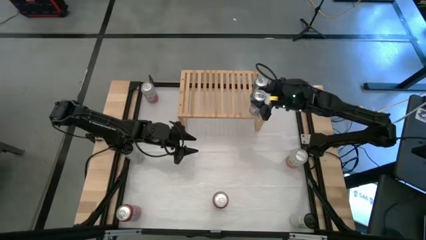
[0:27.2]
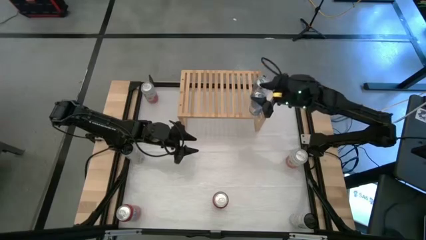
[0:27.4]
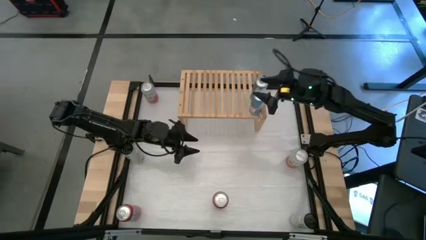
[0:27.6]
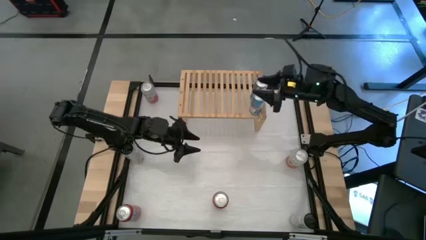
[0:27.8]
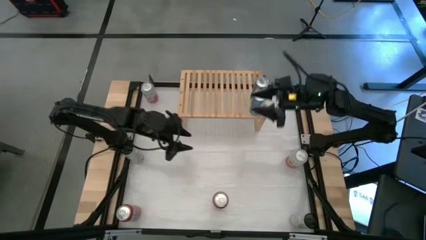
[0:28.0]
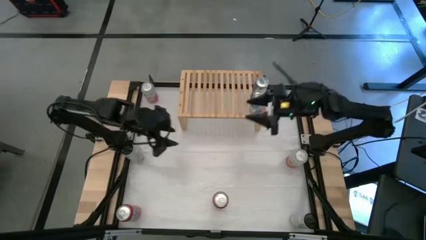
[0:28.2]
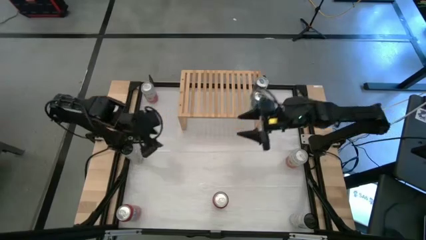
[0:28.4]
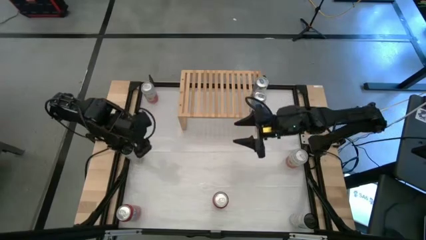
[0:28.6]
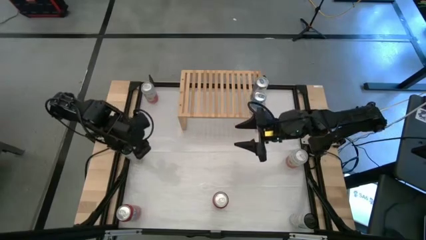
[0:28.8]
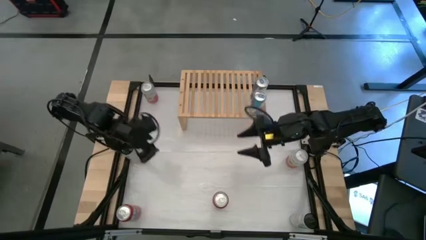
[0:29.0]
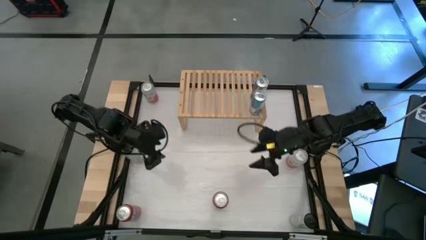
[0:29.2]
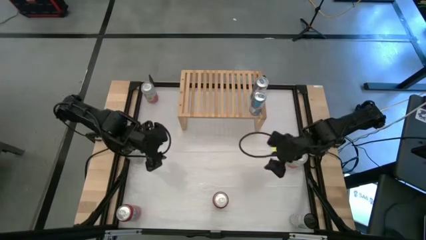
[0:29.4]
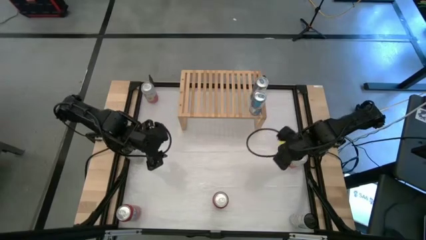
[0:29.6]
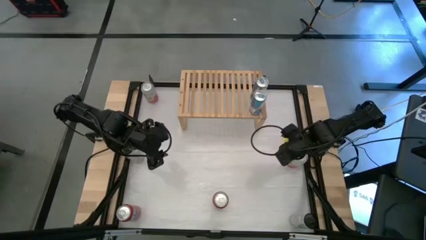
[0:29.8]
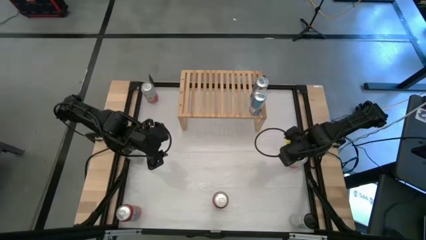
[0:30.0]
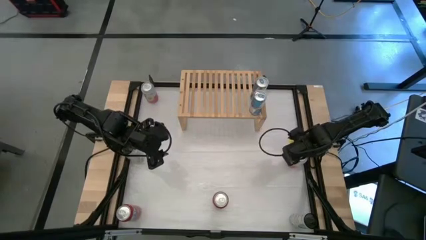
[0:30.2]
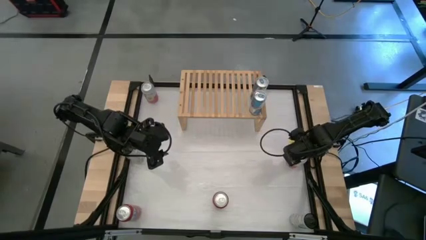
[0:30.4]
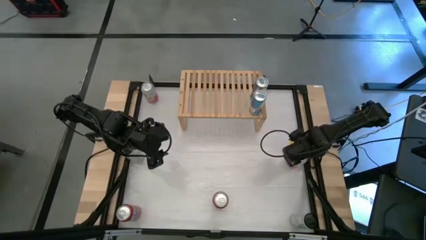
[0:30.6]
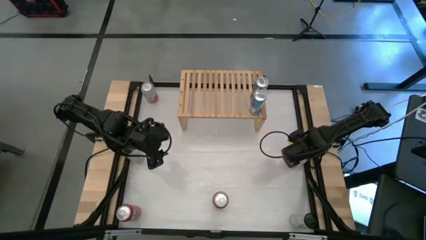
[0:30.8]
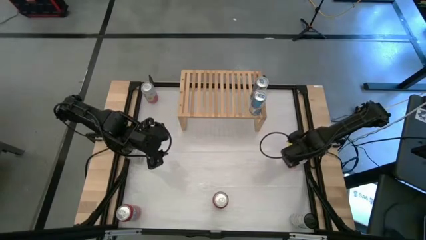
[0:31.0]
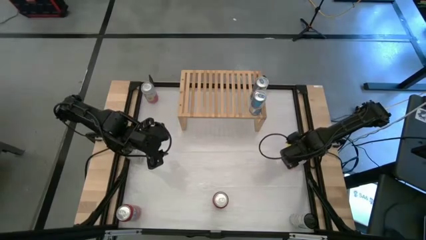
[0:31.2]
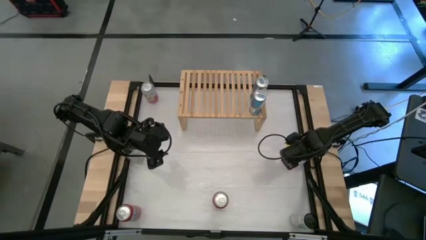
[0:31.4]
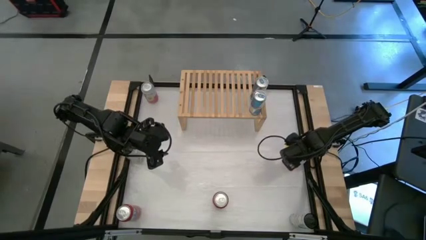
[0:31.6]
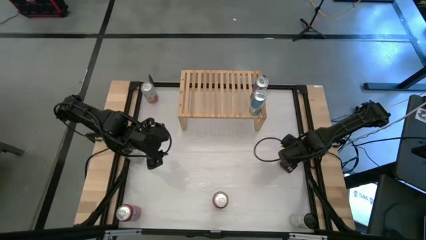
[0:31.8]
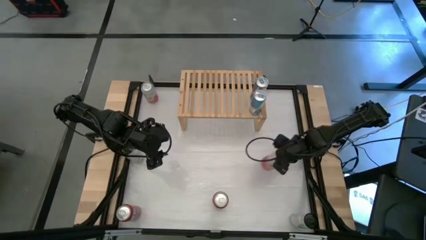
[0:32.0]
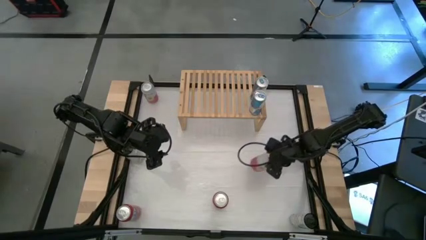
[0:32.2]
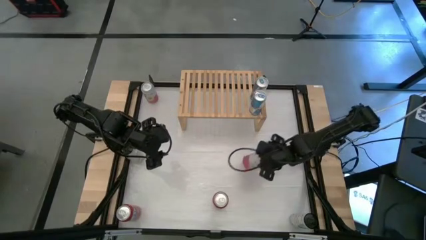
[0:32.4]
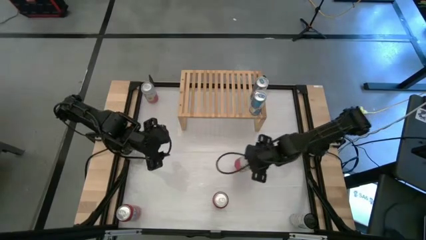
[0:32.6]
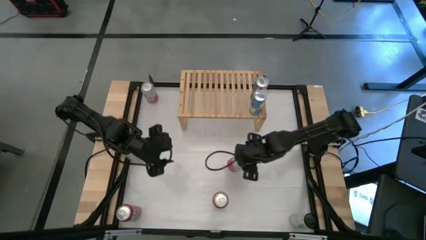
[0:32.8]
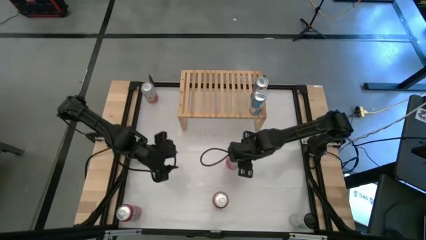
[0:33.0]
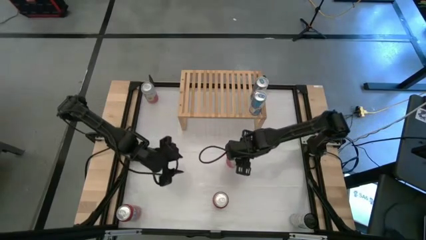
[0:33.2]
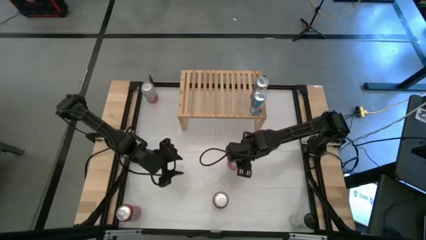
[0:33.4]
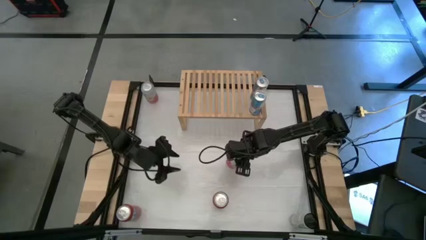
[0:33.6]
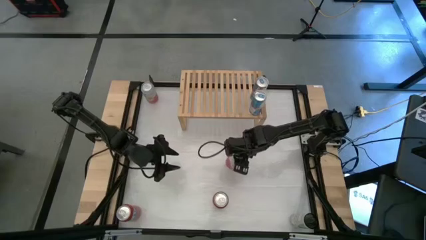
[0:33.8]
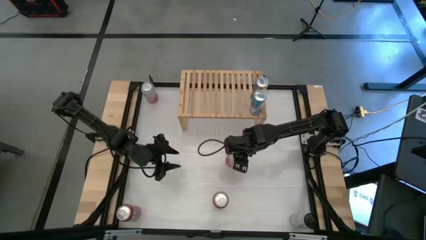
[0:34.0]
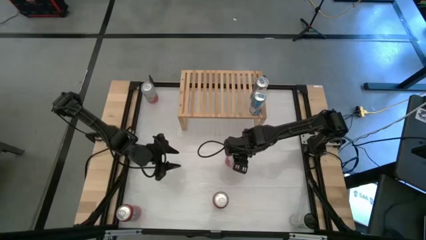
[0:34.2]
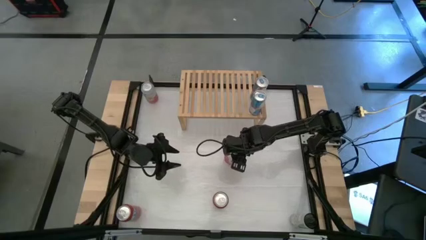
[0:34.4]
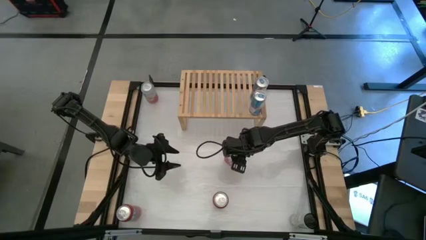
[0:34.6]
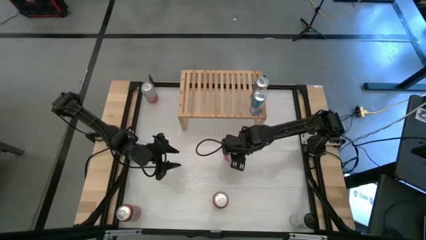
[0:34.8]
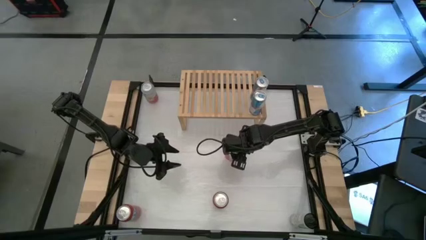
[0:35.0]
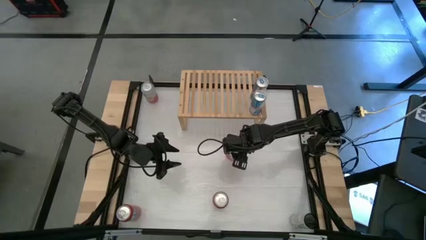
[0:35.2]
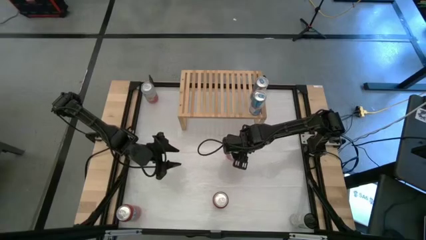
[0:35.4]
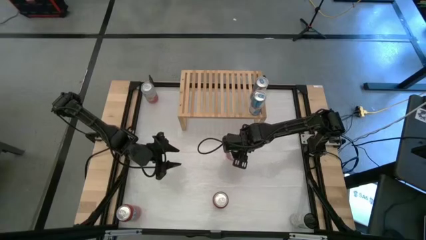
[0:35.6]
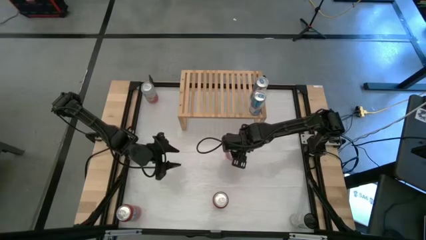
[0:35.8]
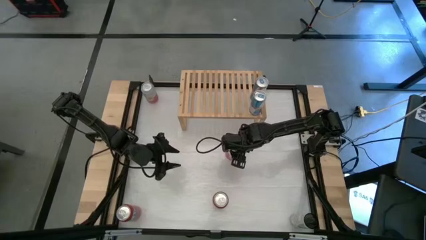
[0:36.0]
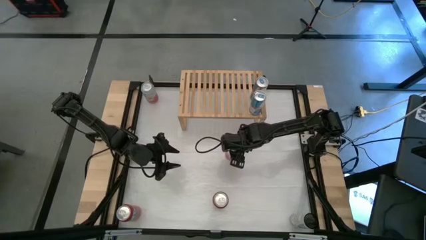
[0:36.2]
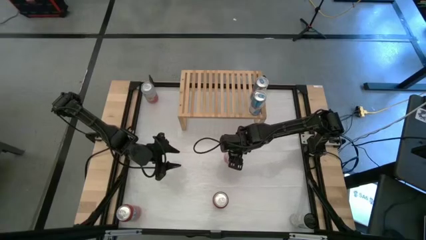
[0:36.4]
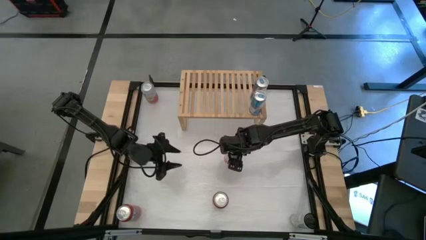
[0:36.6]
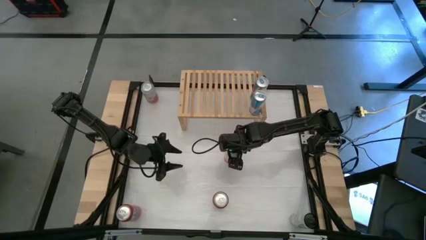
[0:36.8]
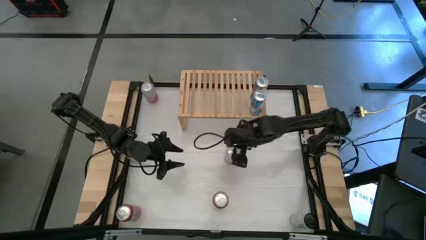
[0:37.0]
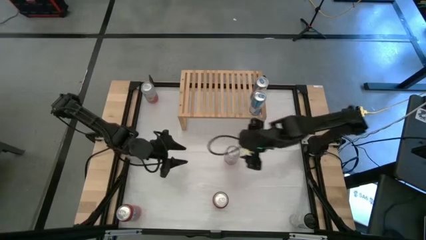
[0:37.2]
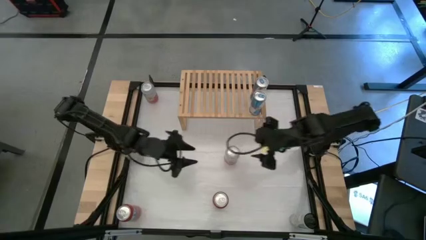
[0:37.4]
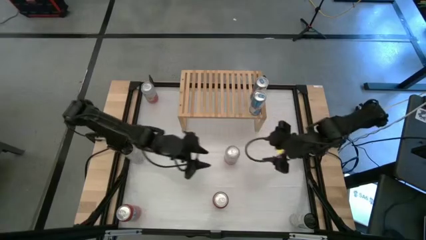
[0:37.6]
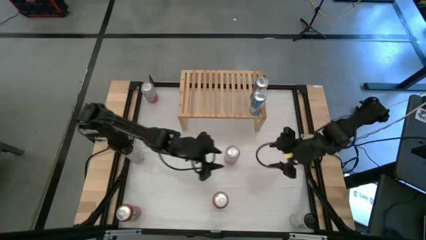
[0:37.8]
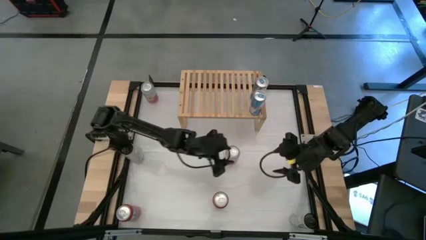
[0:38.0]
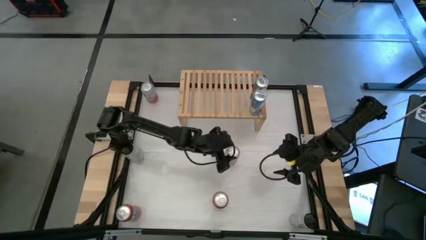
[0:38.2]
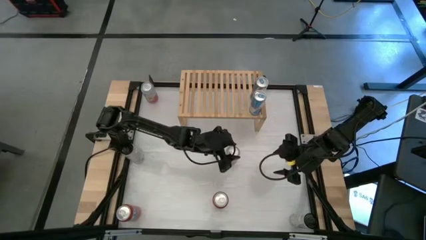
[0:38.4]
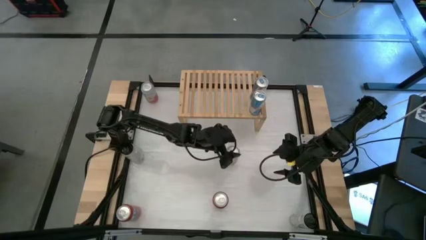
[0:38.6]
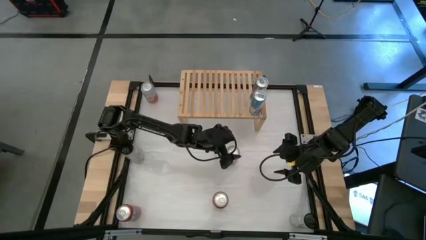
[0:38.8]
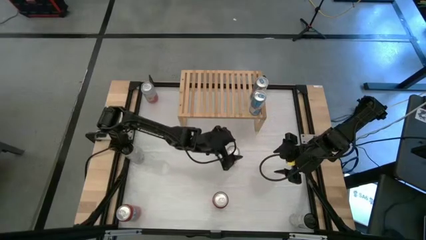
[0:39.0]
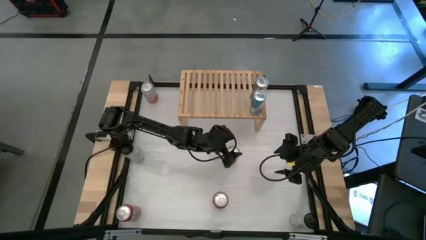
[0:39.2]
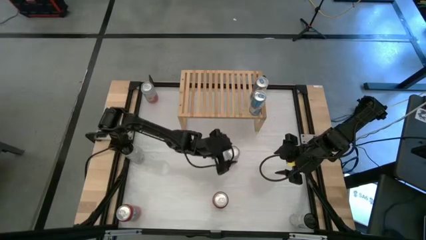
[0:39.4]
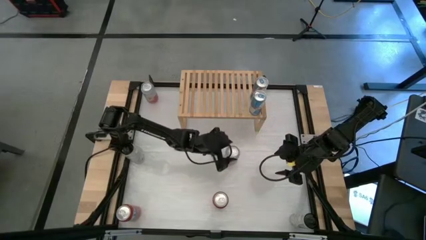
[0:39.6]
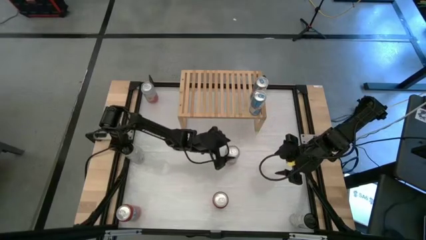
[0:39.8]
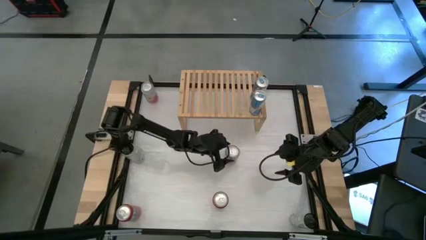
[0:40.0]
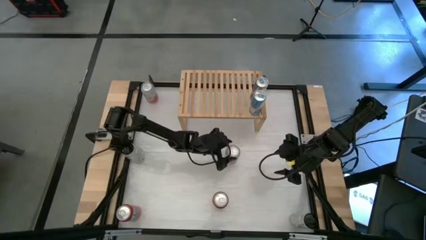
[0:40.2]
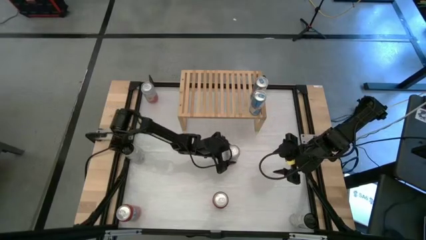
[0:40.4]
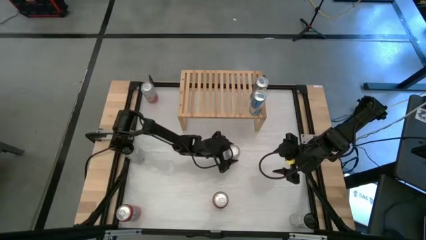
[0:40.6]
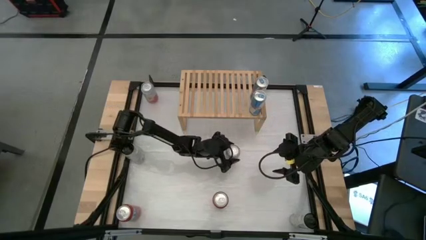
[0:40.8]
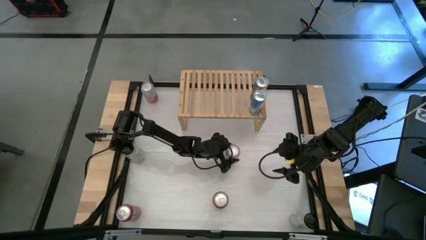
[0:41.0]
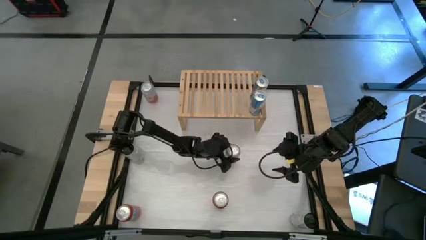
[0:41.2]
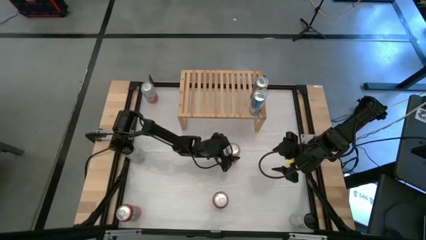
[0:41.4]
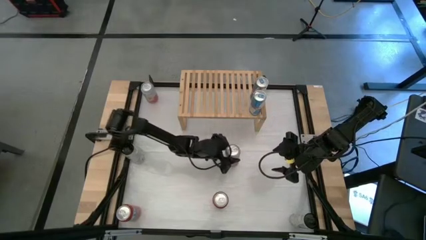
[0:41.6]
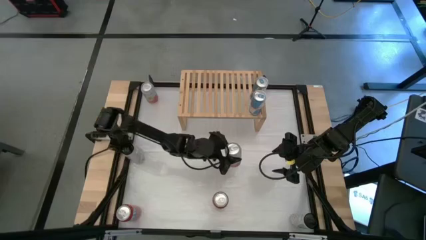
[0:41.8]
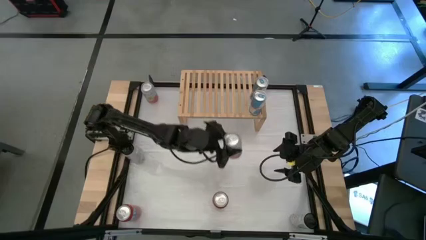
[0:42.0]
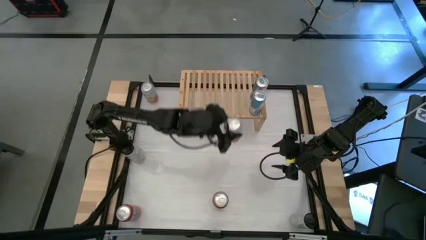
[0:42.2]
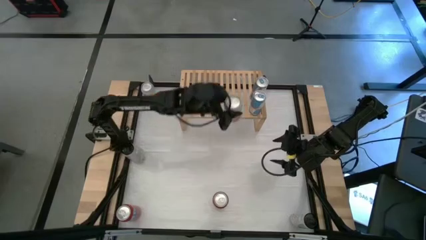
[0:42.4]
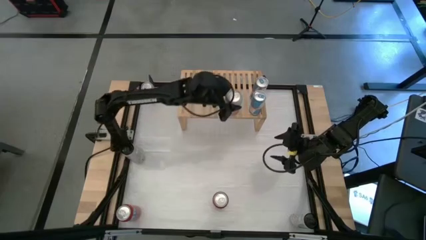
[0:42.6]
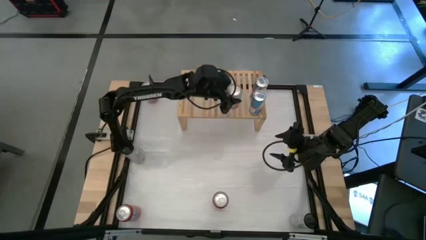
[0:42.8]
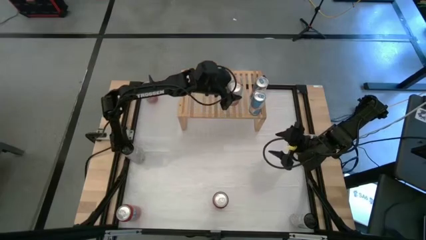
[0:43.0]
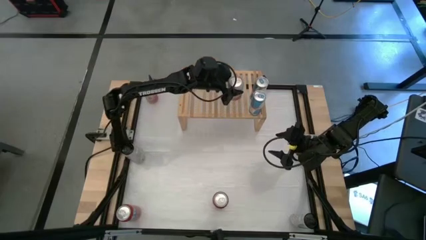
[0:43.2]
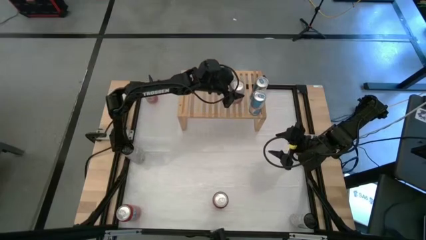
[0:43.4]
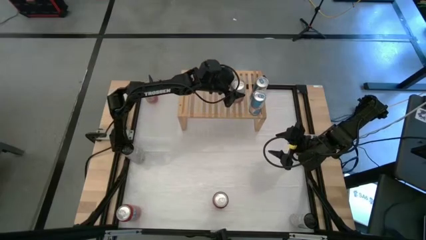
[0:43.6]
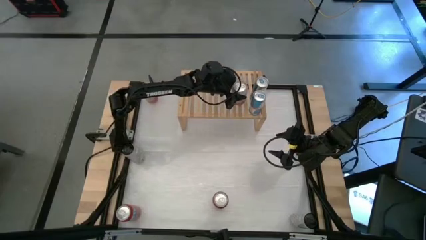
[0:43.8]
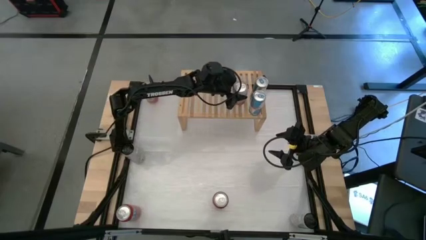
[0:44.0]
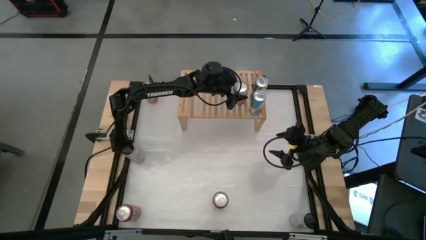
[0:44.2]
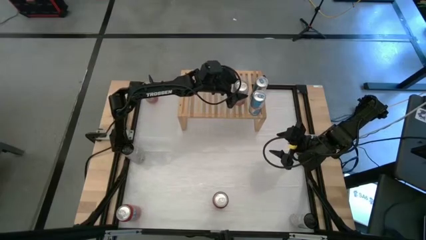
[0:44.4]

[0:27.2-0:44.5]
Task: Place canned beverage on shelf
Put the left pink soda can on the shelf
